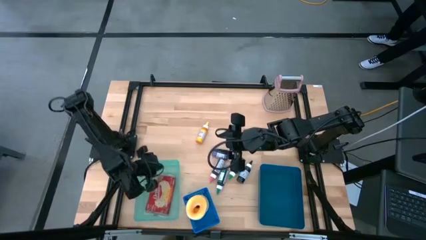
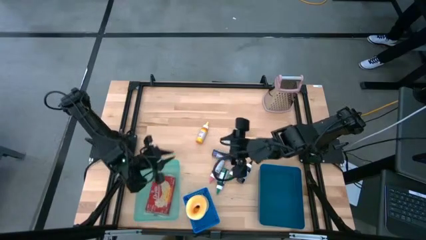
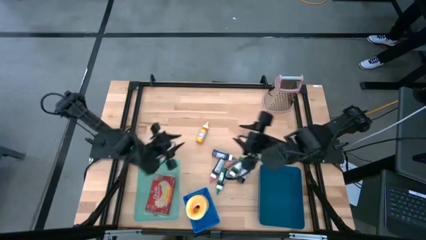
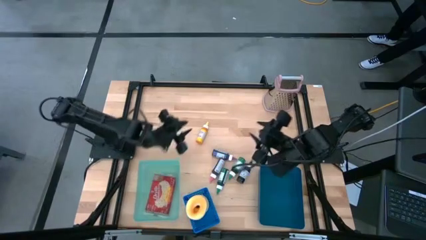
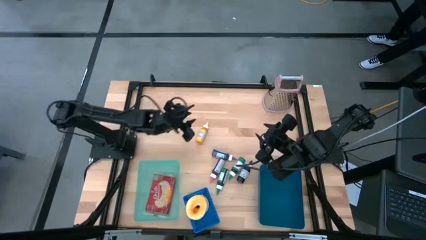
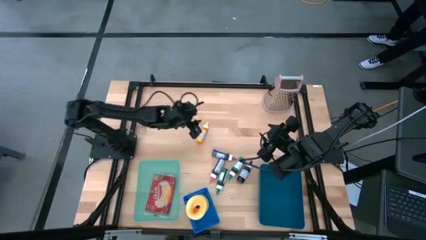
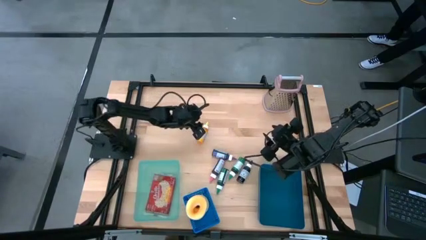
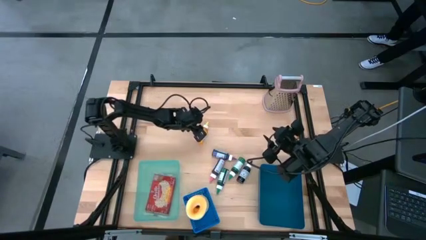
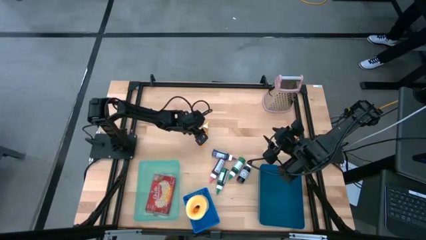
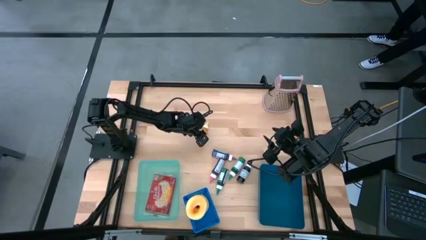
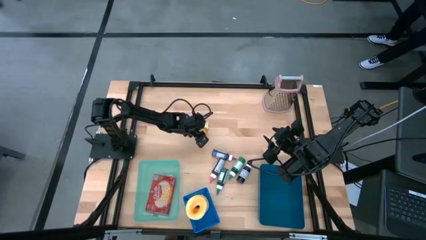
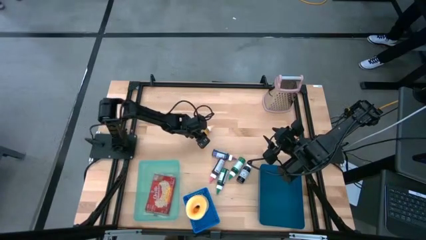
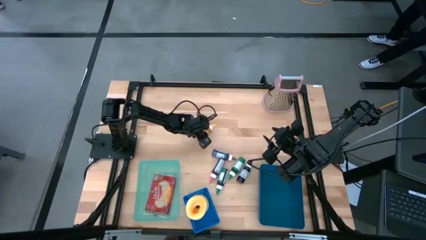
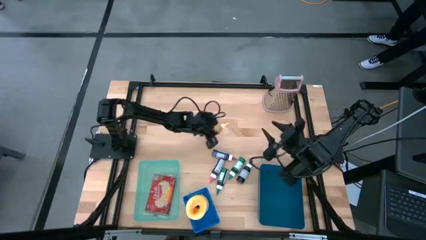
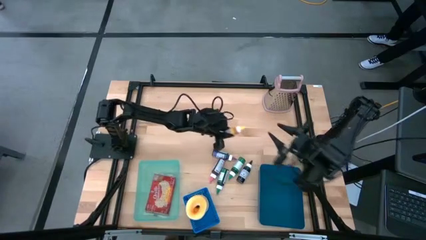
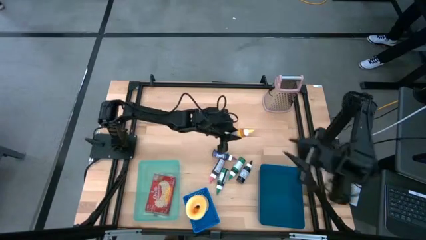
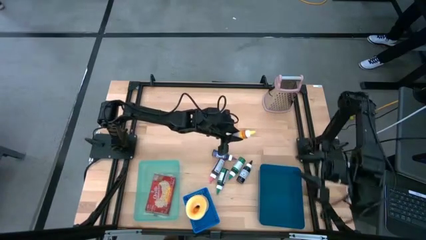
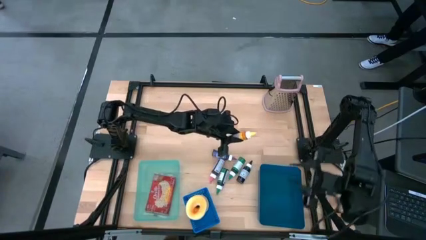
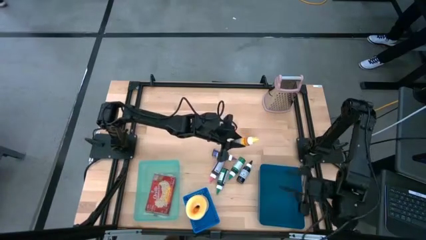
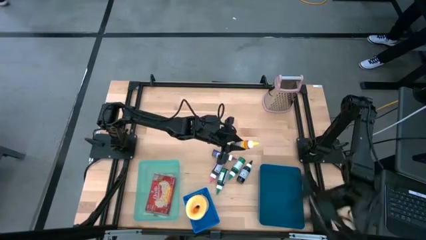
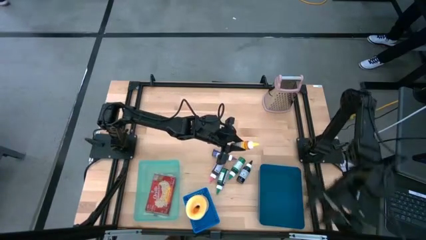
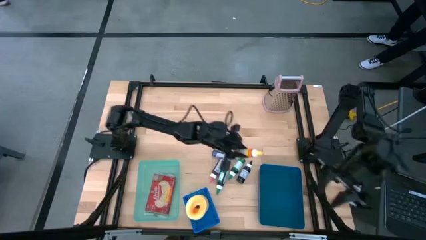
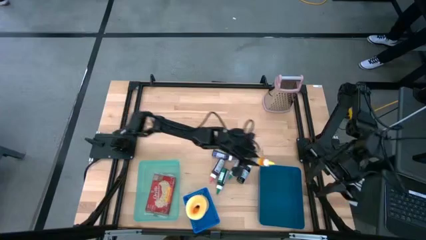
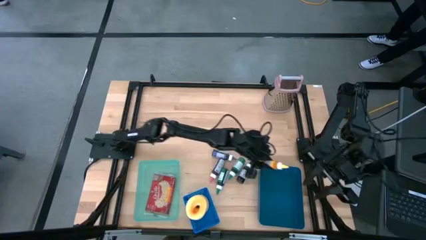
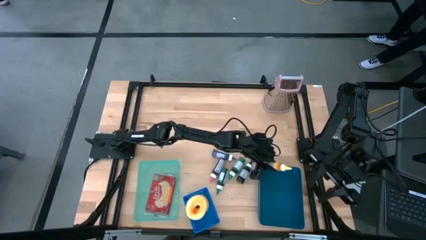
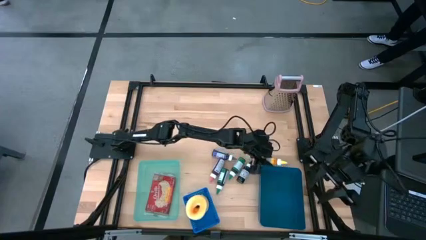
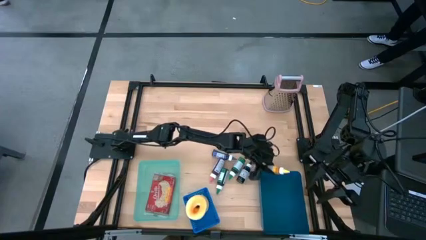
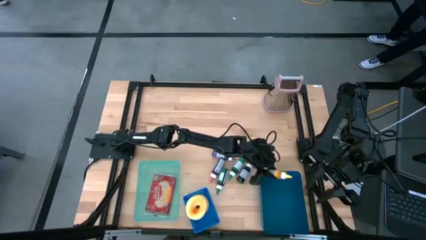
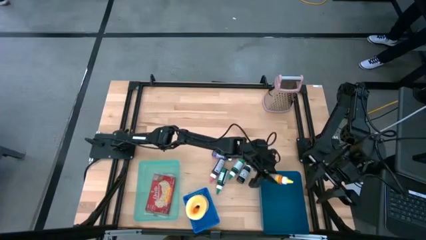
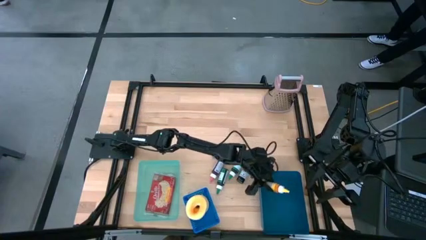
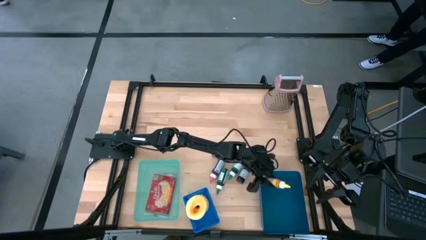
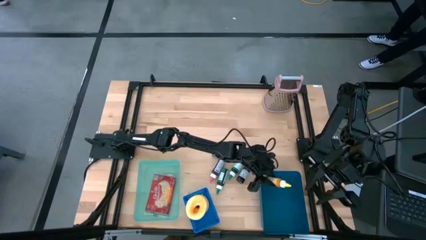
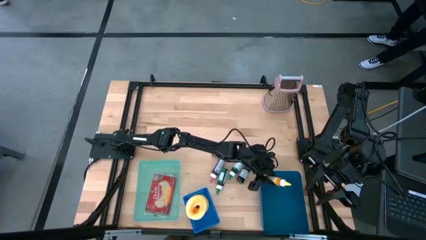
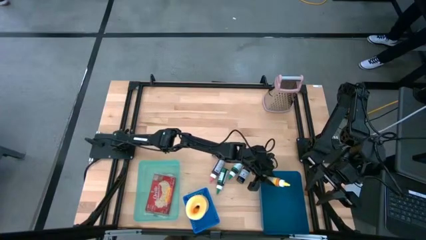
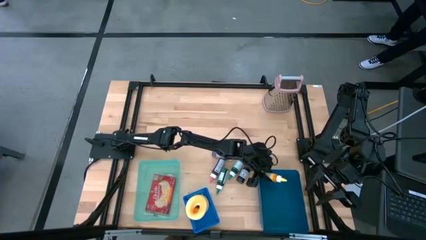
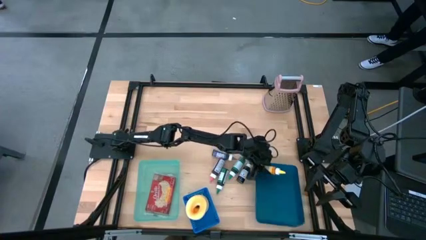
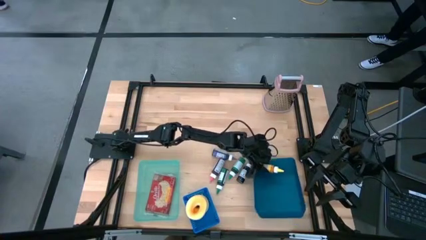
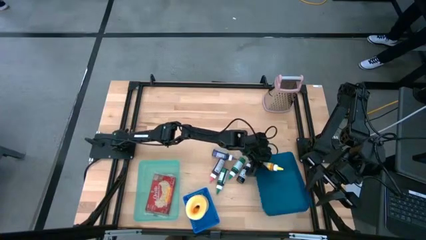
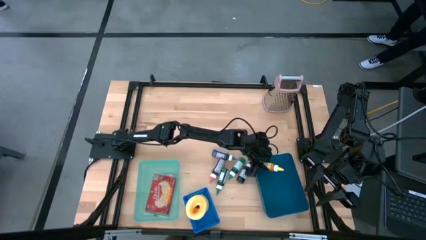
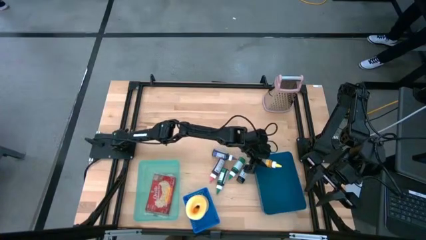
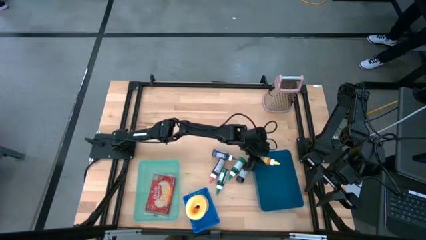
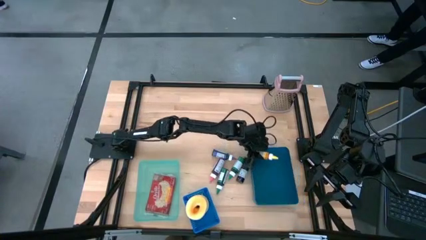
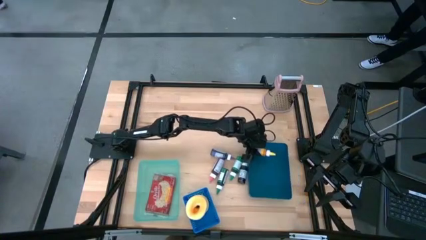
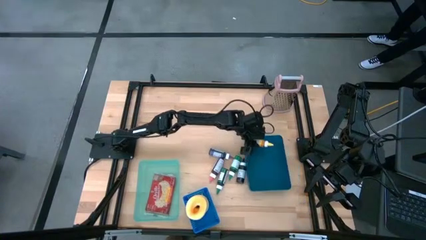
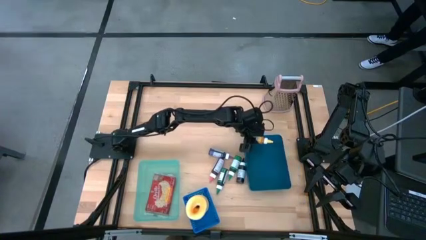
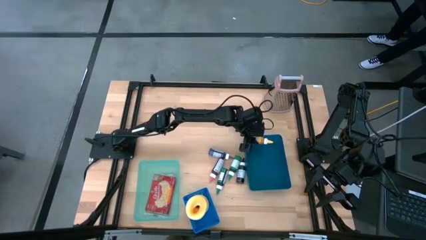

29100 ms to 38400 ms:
Put the yellow food coloring bottle into the dark blue bin

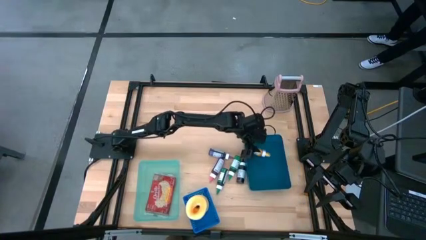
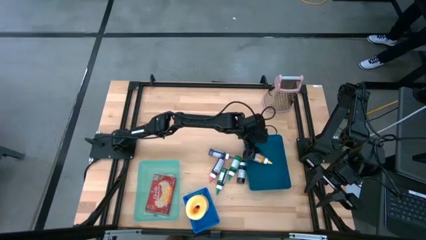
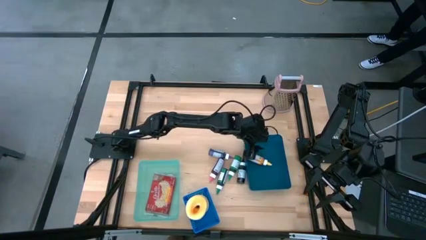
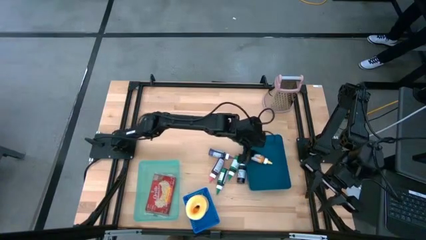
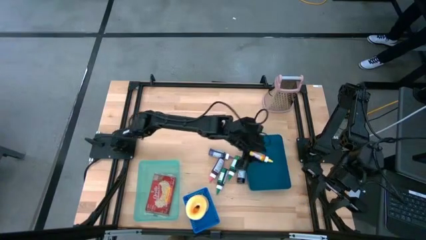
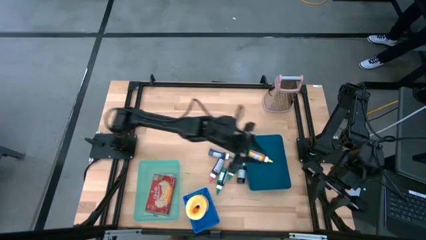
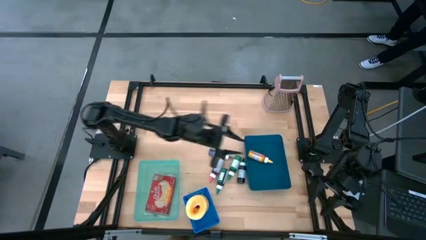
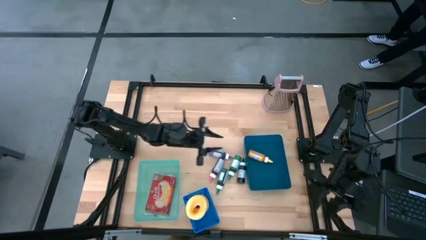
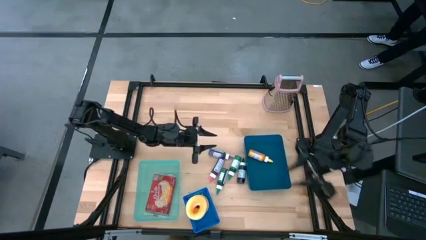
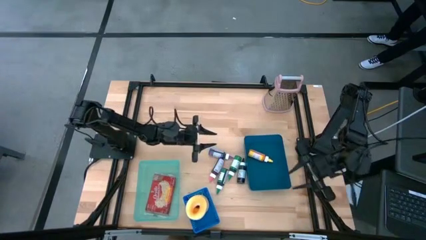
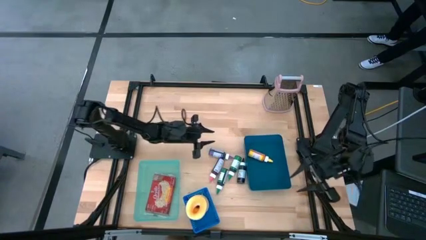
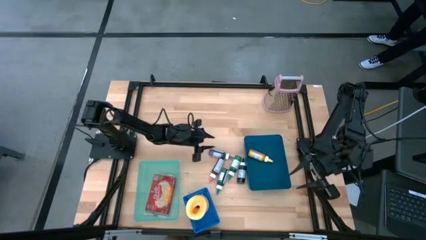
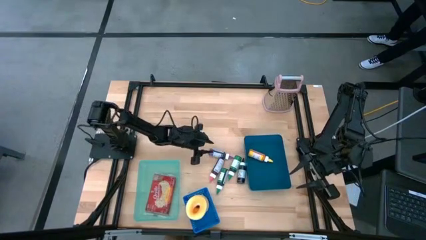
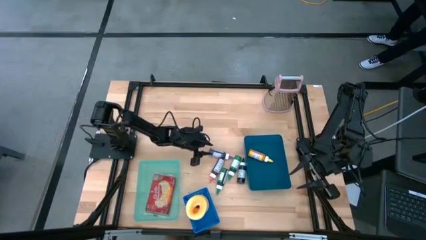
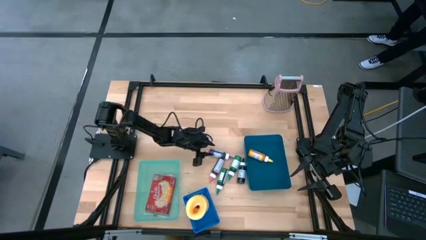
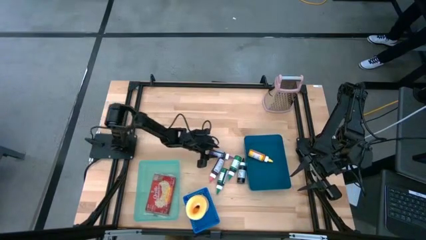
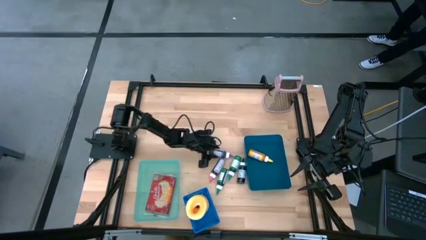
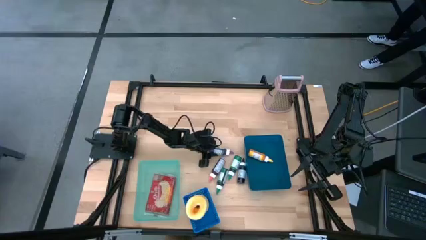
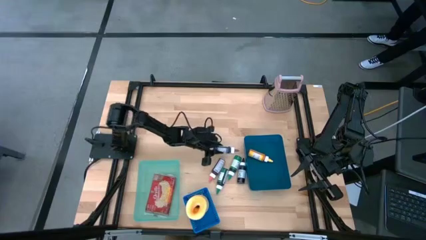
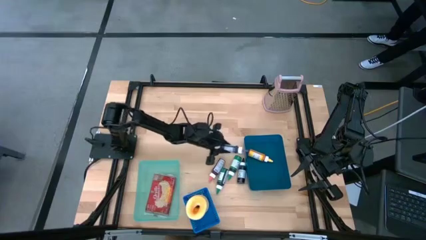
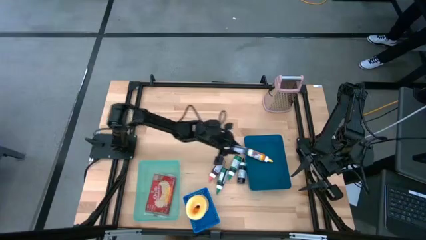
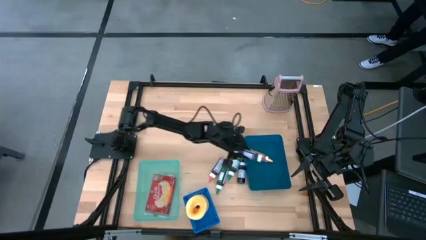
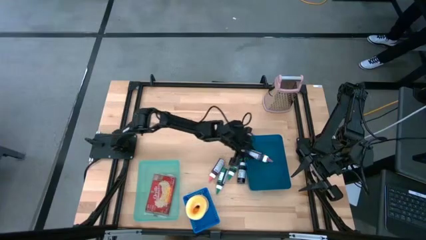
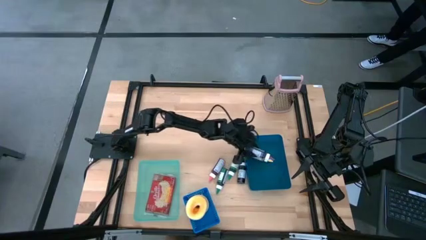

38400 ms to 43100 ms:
Put the violet food coloring bottle into the dark blue bin
